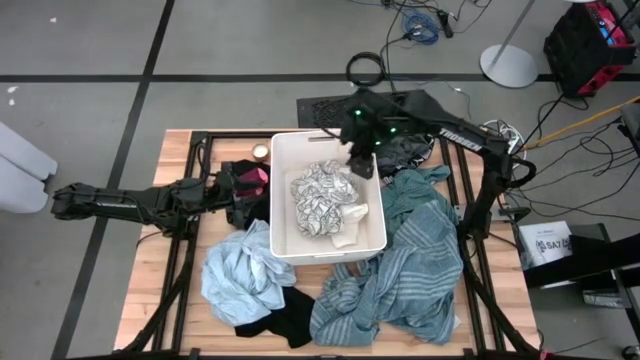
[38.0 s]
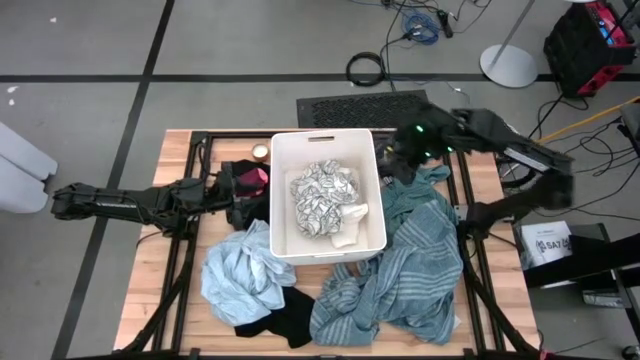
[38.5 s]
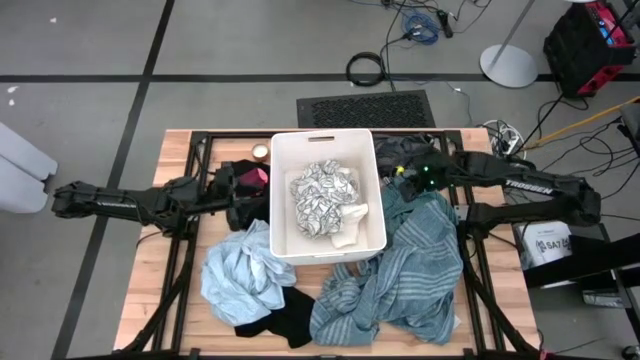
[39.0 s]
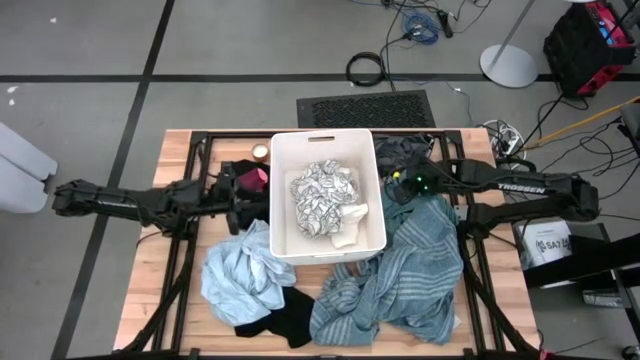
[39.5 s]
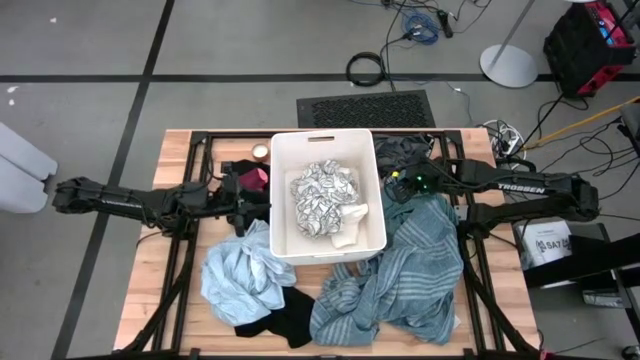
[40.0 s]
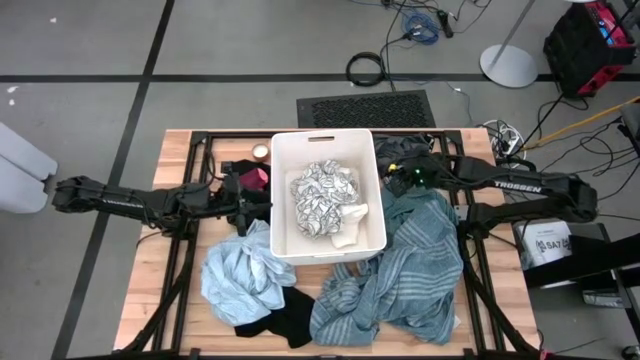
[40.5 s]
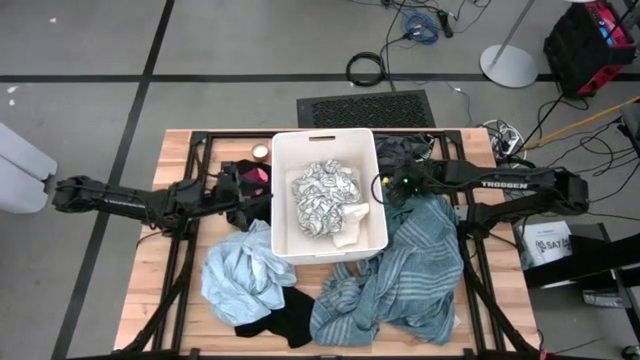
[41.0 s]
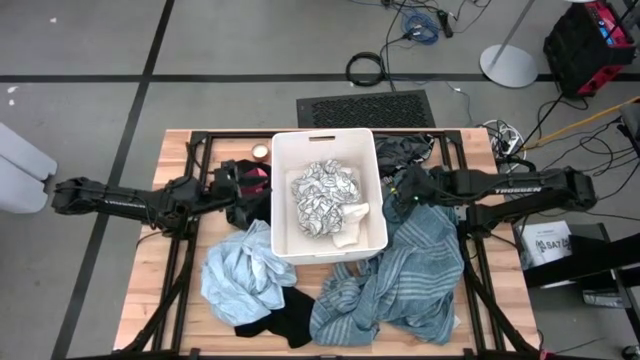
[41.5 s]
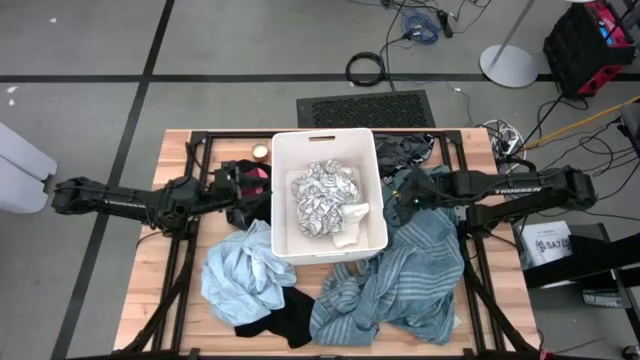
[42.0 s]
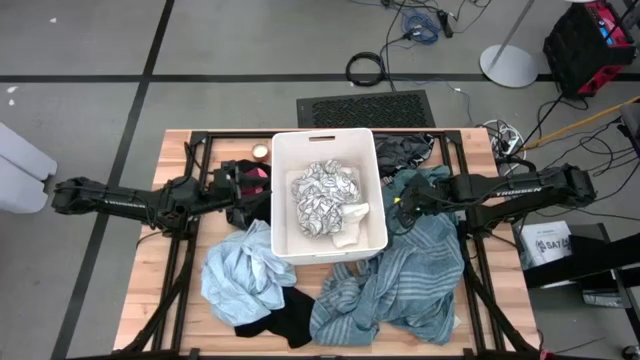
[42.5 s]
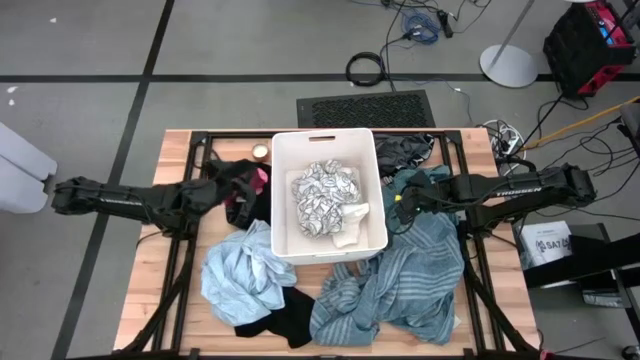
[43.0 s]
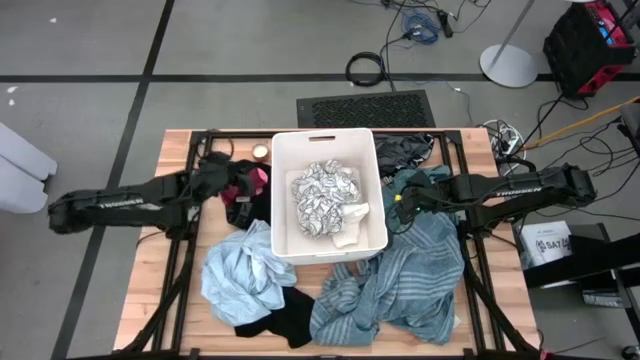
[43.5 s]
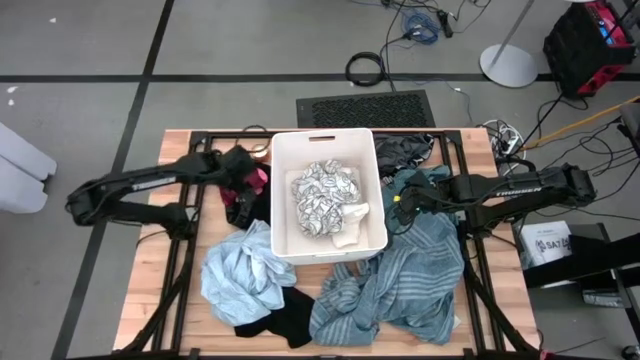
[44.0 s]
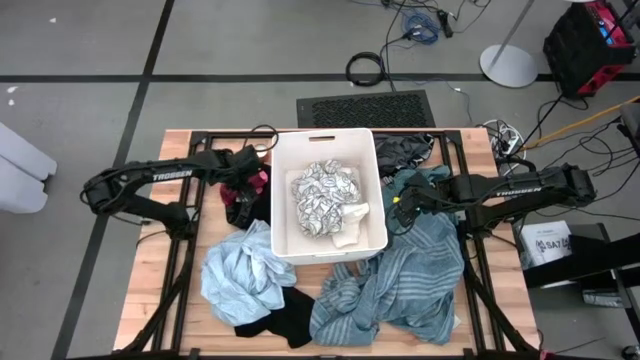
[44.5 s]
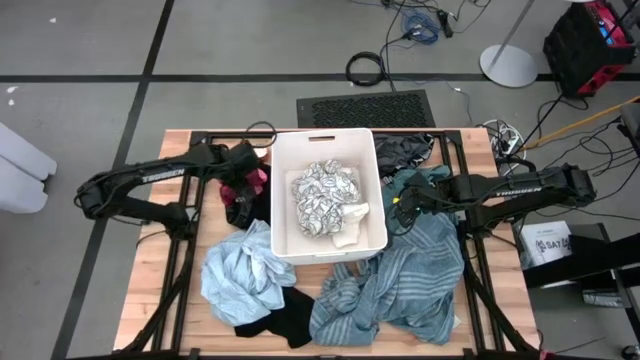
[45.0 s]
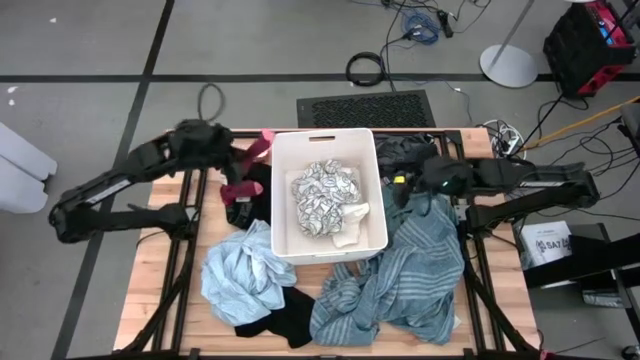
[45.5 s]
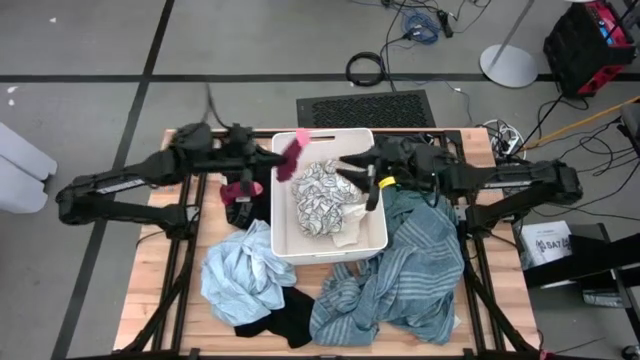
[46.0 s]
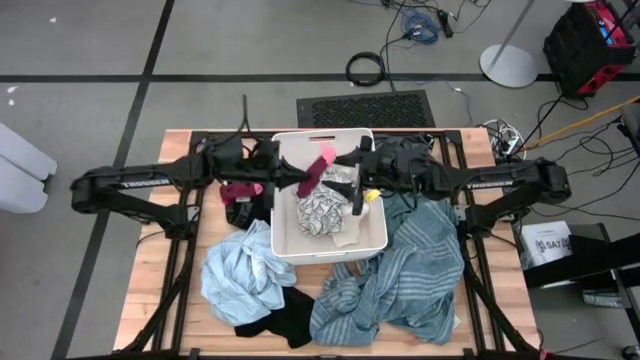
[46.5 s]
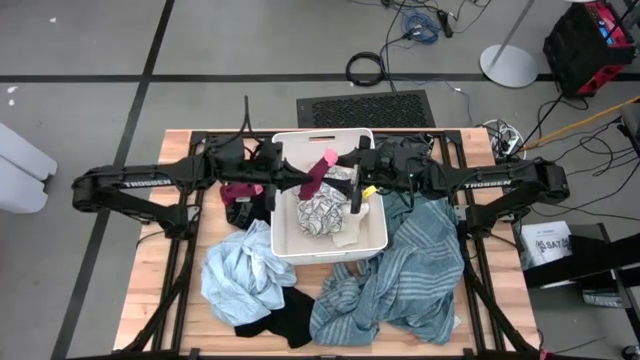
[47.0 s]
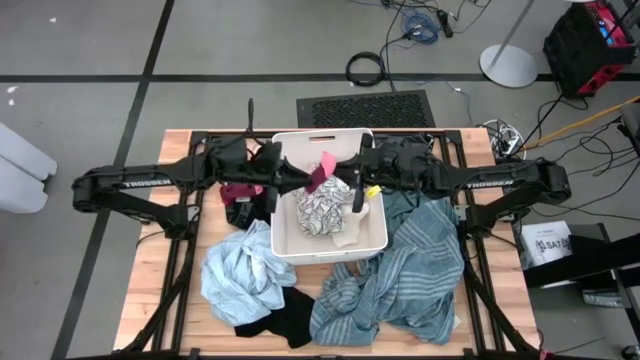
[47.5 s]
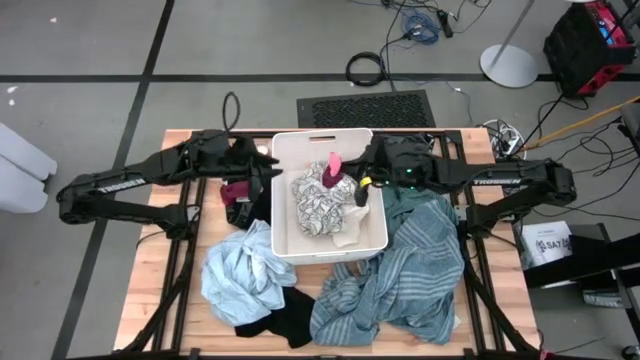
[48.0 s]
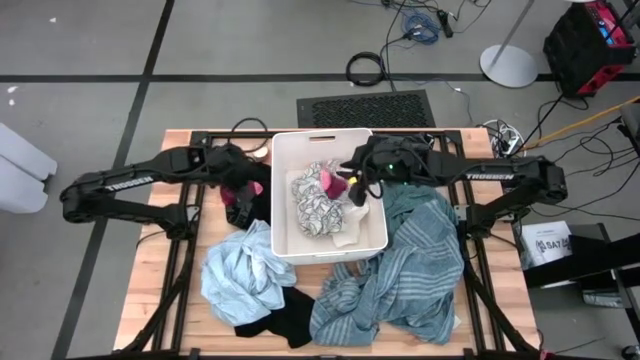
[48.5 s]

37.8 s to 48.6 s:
Task: Sort clothes
Put the top red sock into the laundry bin

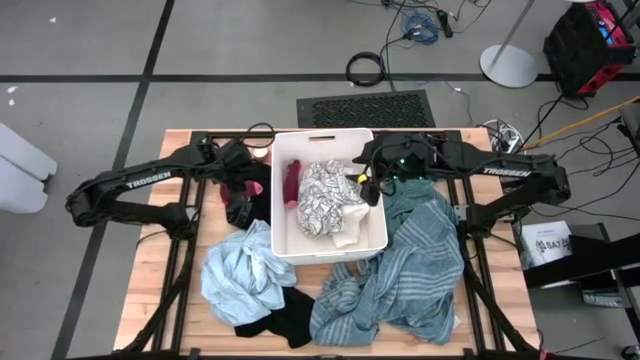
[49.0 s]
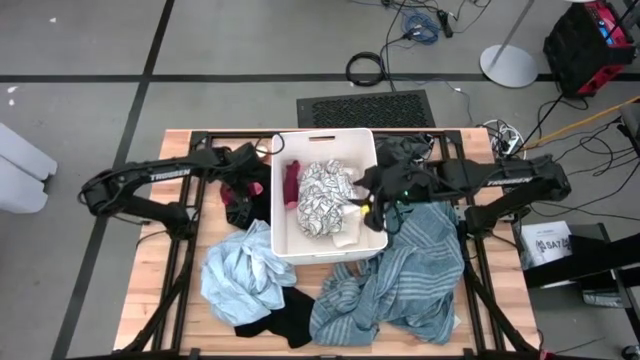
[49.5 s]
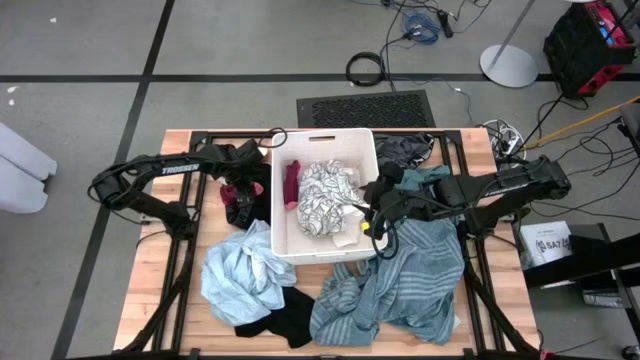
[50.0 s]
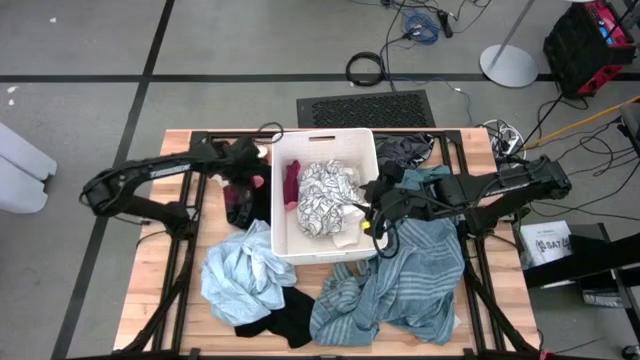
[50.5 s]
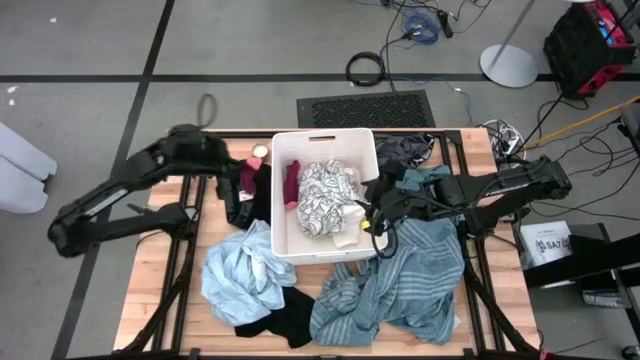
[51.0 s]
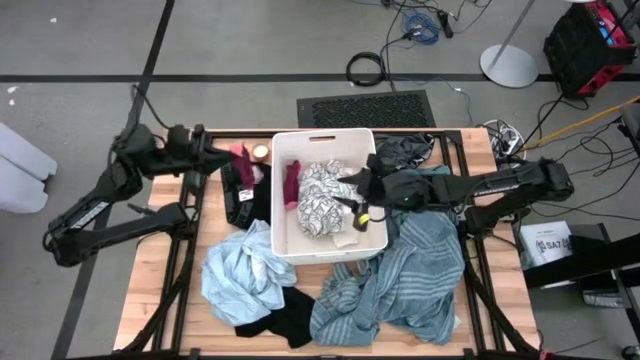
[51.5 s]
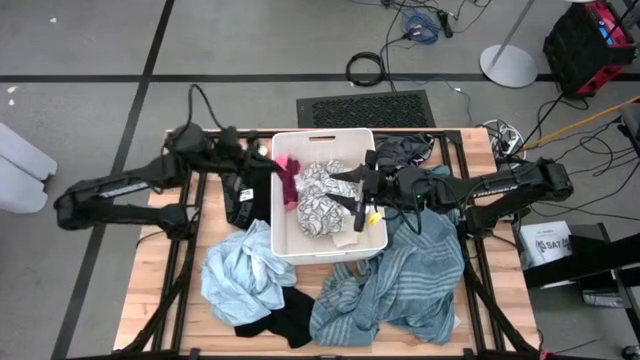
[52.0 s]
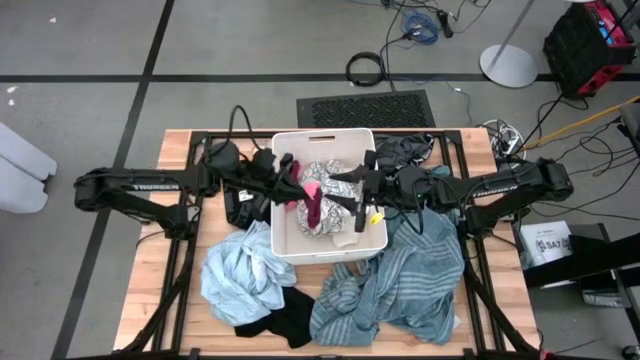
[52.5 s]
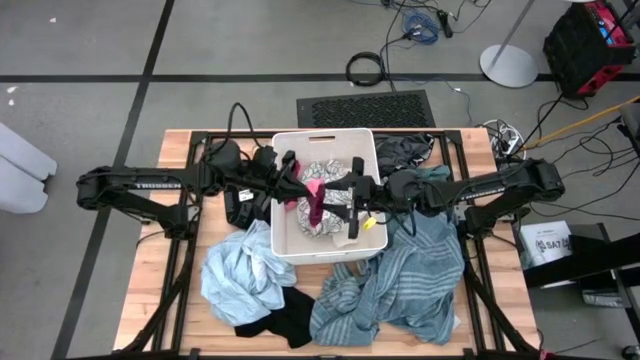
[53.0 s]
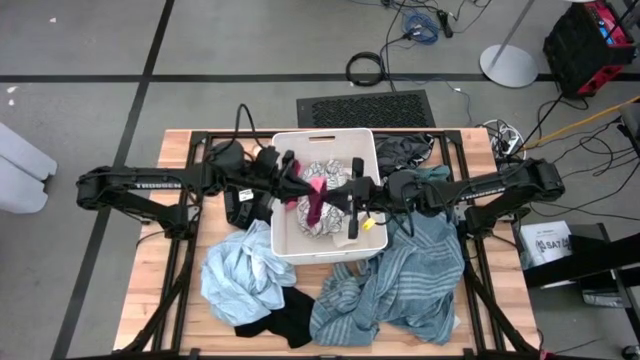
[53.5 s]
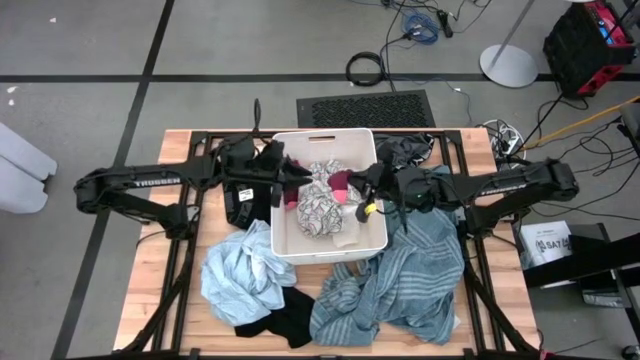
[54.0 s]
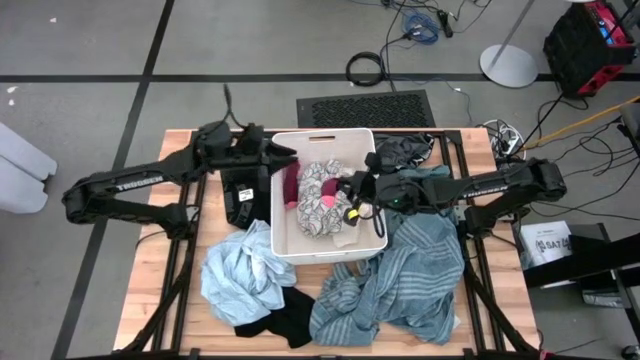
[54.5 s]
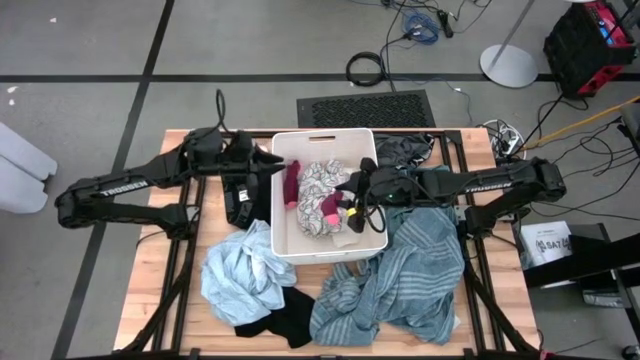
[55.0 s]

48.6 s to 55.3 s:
Put the red sock into the laundry bin

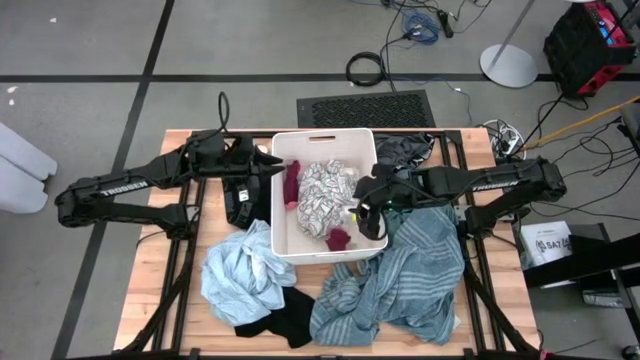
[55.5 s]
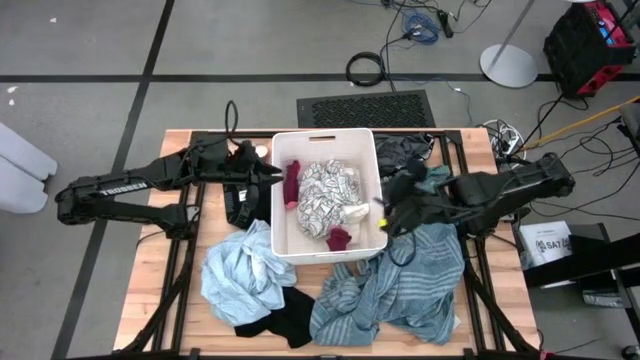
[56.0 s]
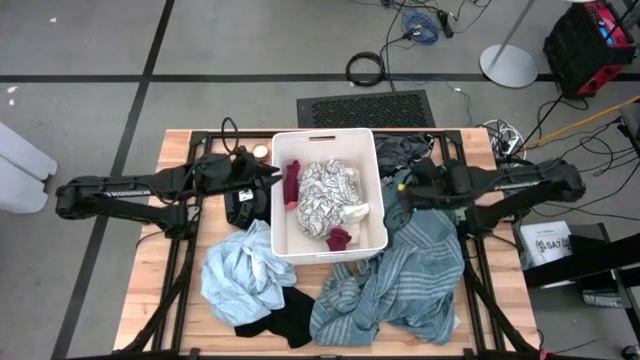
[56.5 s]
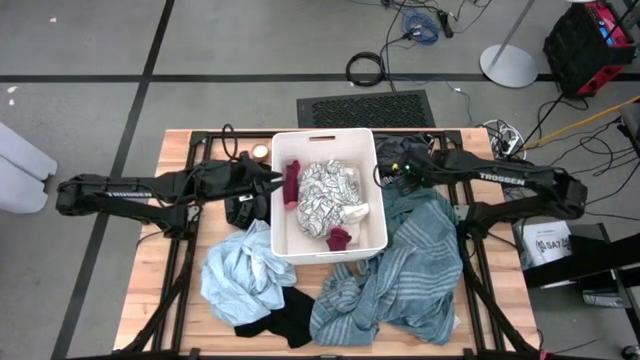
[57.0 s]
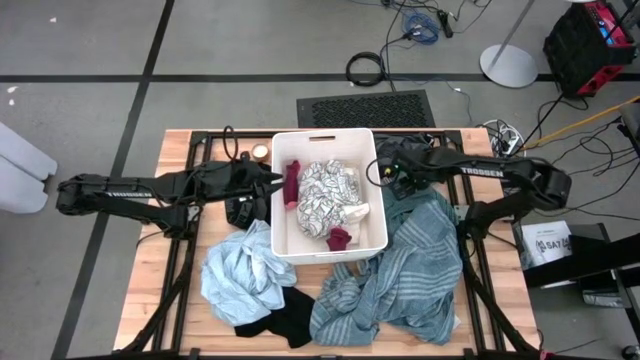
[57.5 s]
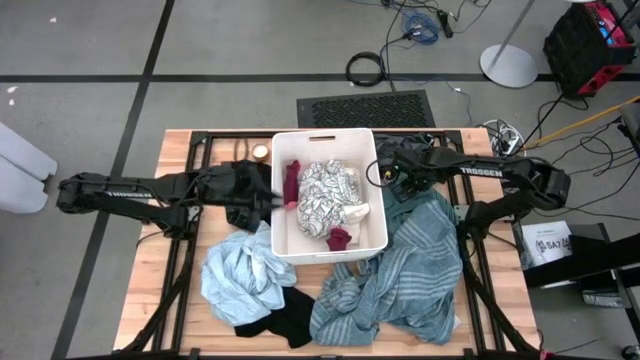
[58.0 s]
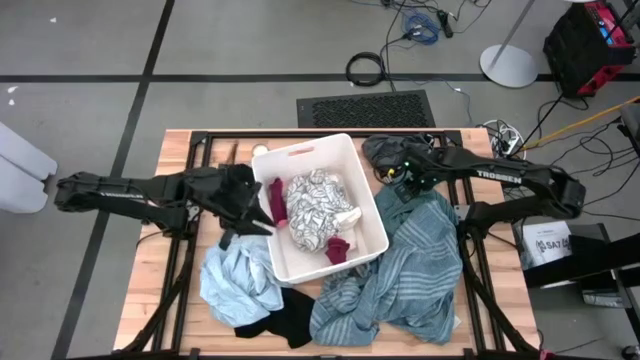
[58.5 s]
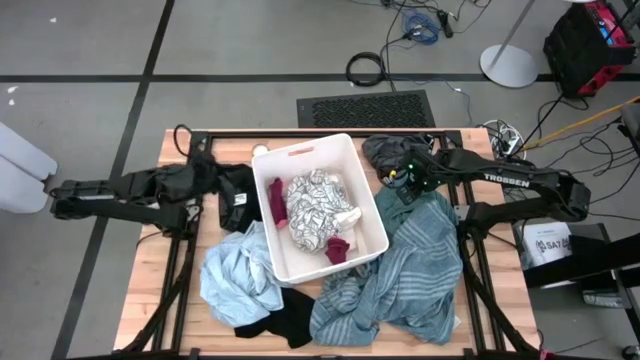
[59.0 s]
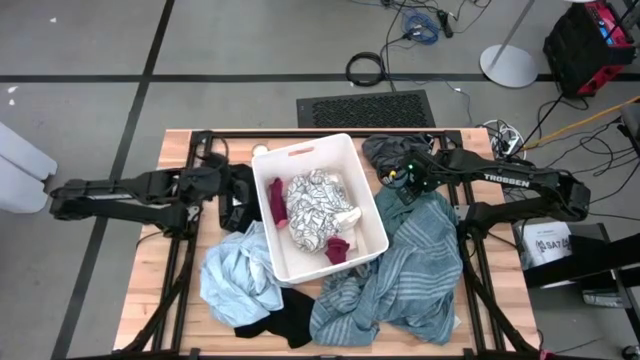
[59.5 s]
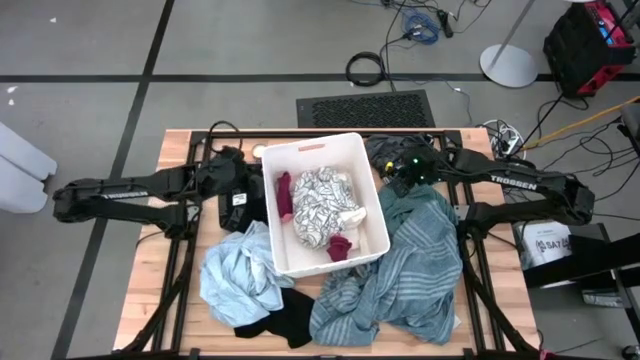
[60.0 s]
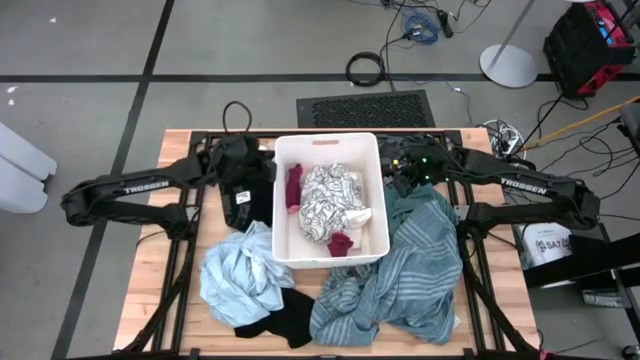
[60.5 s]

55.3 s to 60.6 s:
Adjust the laundry bin on the table
